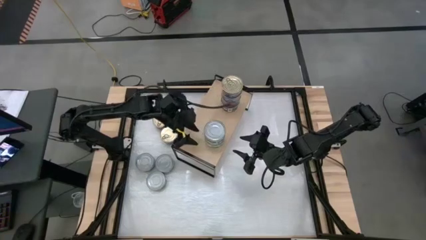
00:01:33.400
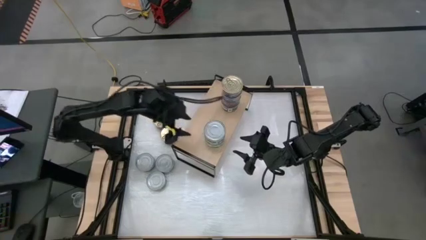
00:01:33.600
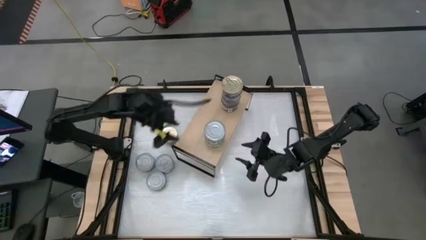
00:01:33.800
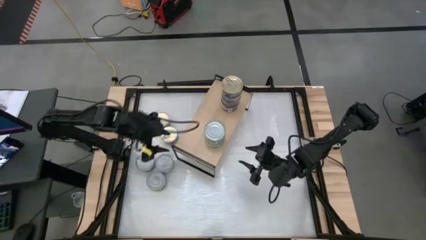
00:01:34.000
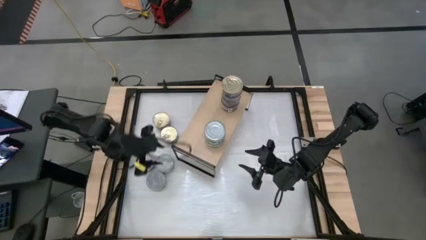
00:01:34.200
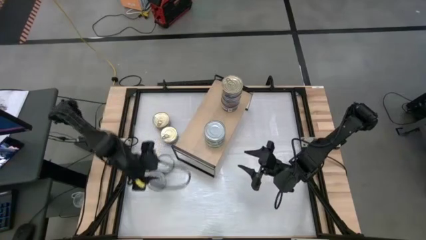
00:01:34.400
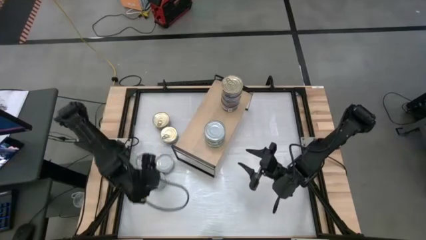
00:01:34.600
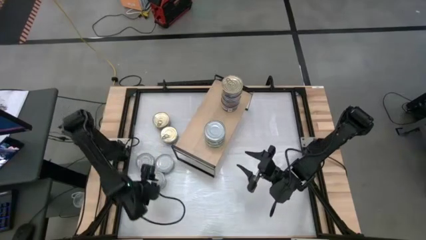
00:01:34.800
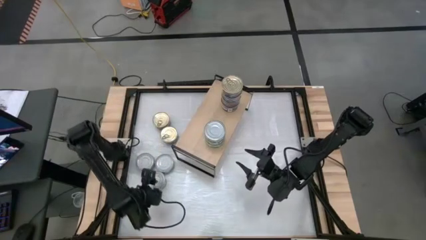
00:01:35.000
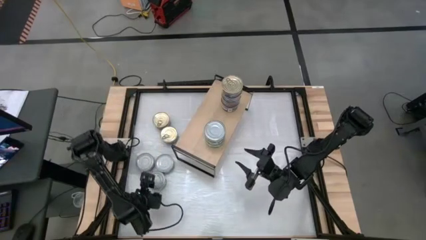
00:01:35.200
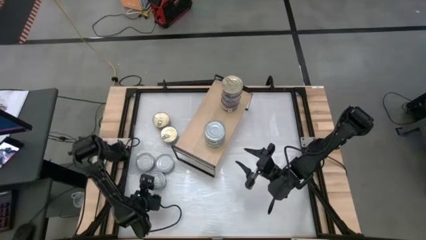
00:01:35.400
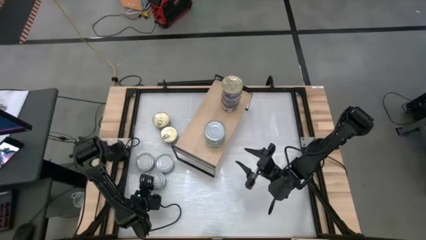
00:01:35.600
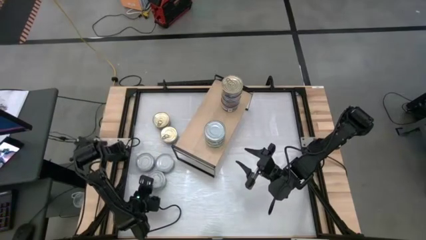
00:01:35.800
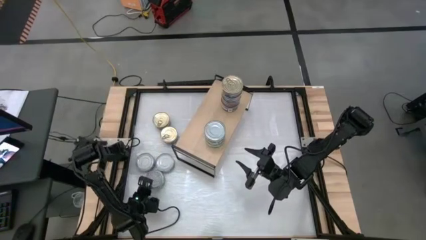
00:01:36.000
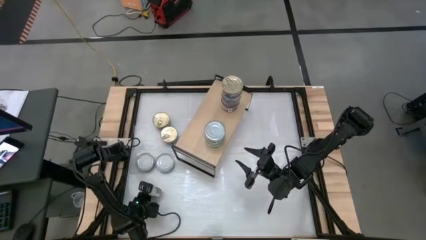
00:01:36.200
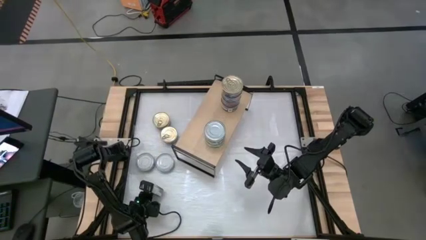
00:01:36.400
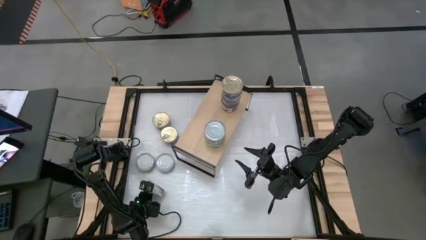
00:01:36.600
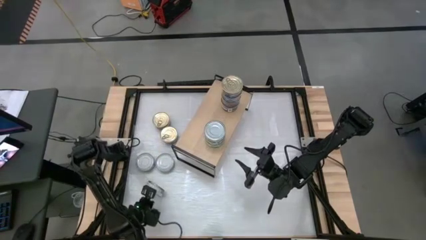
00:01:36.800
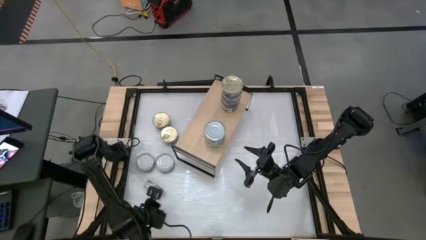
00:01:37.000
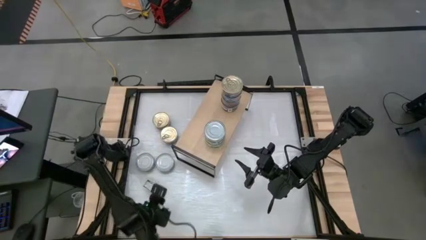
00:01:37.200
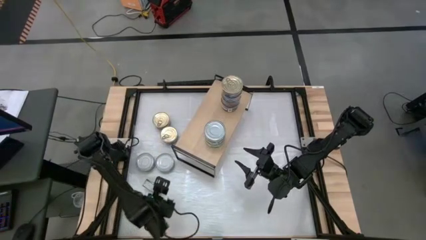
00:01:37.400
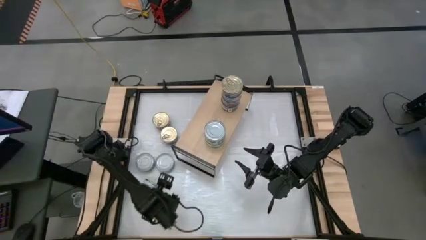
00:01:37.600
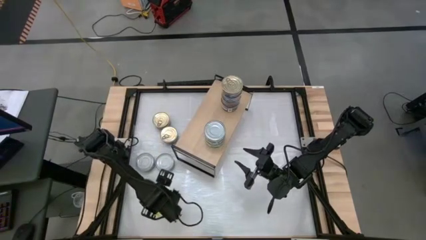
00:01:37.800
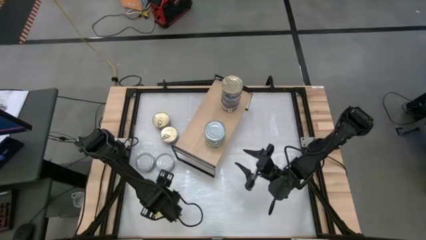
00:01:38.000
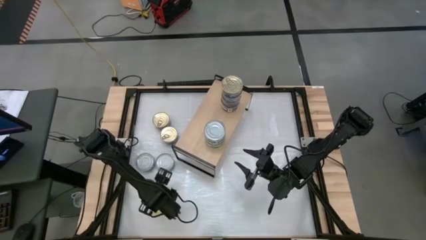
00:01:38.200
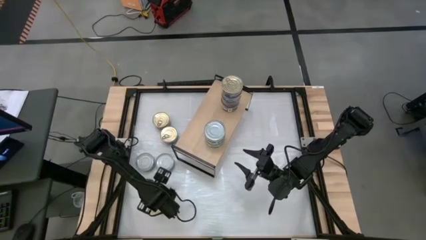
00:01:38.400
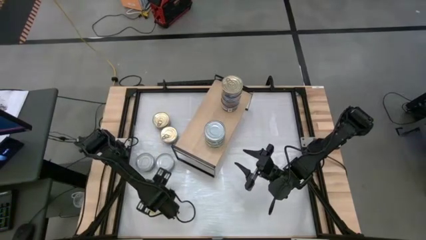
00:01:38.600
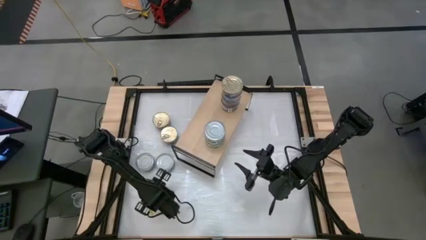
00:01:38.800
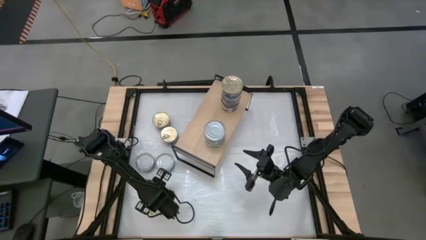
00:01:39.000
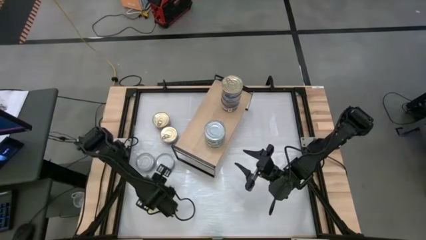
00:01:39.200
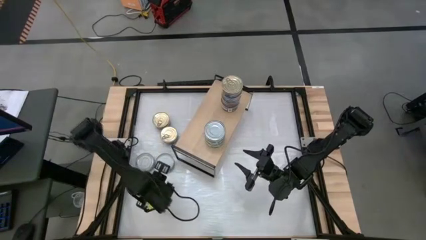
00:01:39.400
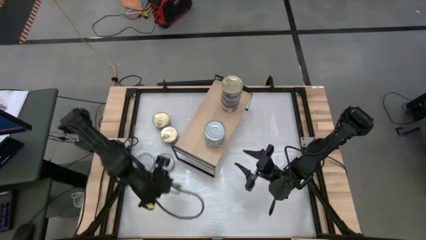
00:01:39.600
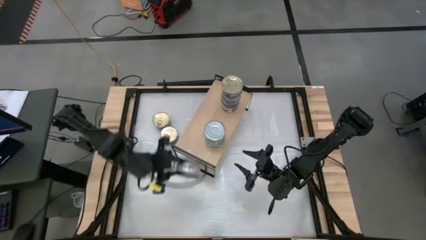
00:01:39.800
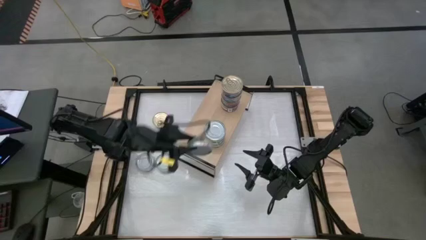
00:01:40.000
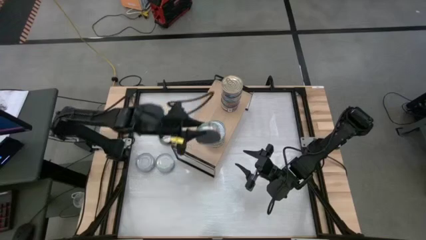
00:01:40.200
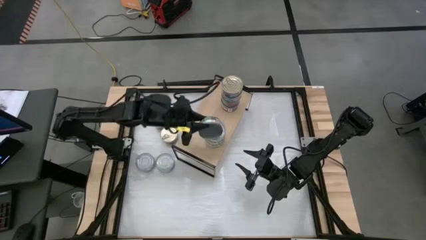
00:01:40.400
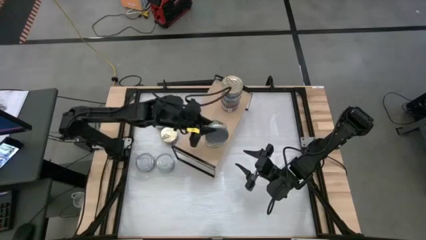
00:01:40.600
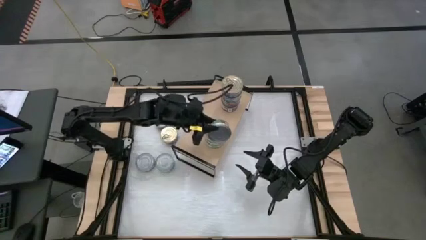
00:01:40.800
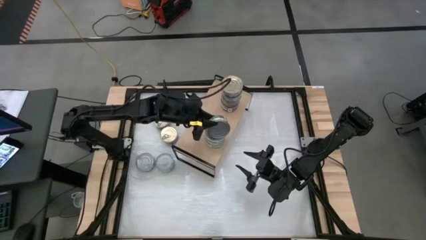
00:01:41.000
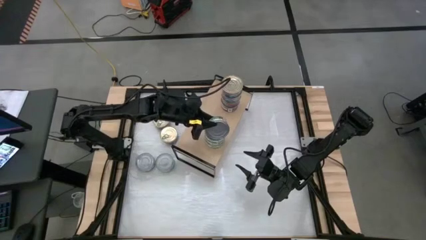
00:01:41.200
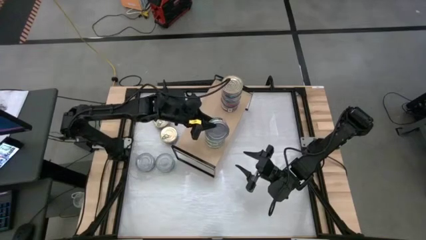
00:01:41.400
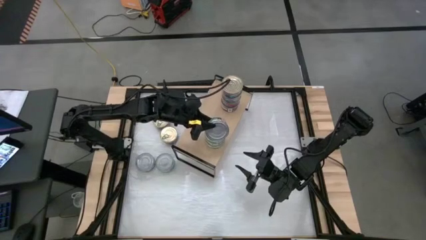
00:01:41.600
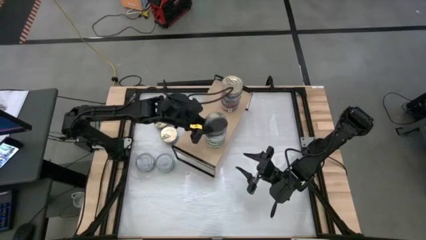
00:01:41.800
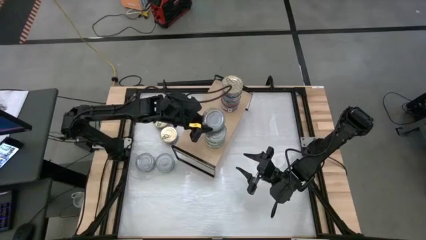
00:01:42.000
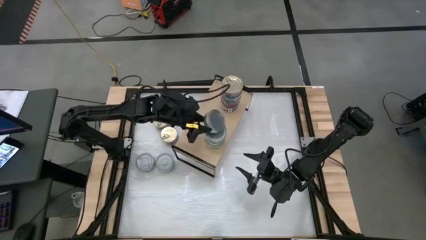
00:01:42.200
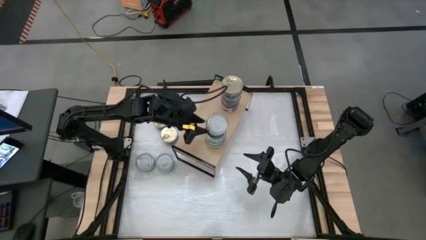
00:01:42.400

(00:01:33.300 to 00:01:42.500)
Task: Stack canned seafood by type on shelf
Stack the green tuna can on top of the other green tuna can

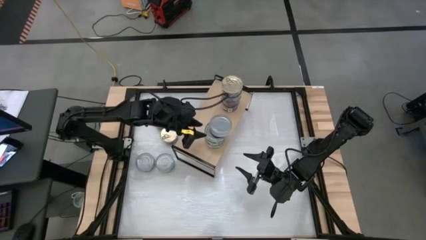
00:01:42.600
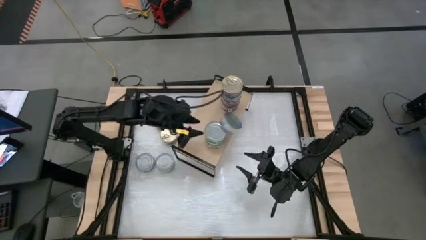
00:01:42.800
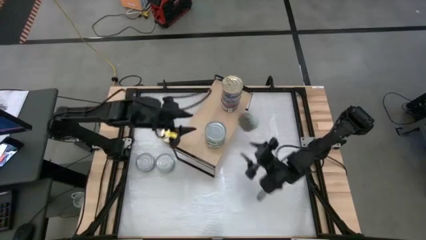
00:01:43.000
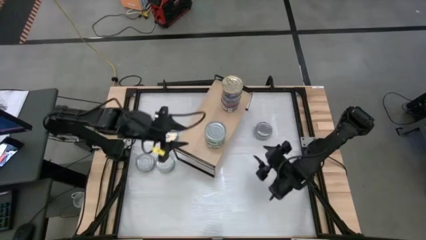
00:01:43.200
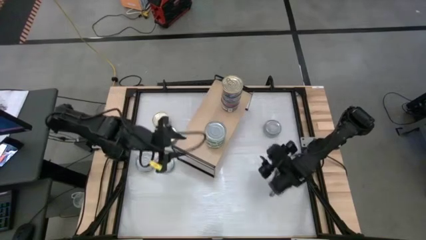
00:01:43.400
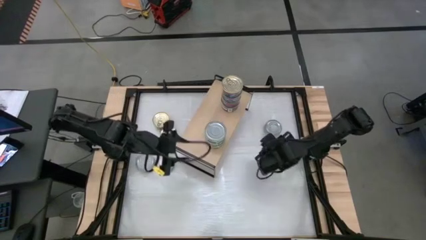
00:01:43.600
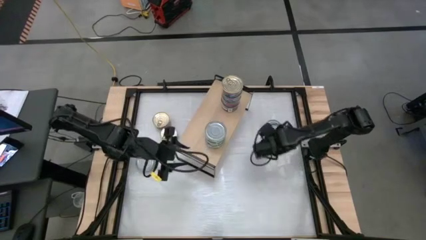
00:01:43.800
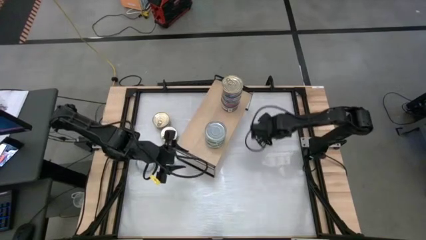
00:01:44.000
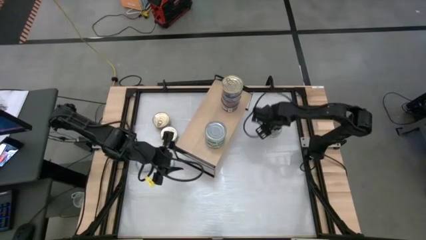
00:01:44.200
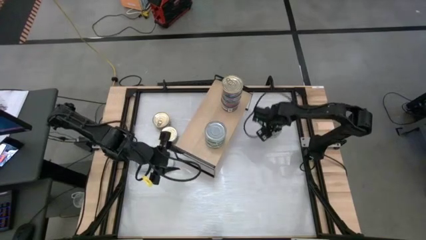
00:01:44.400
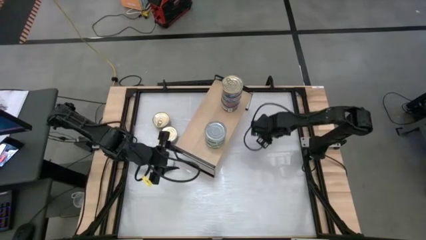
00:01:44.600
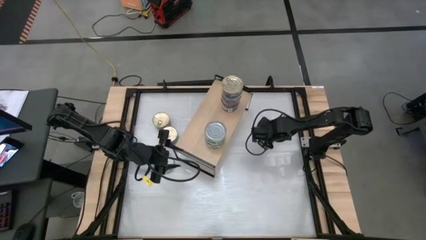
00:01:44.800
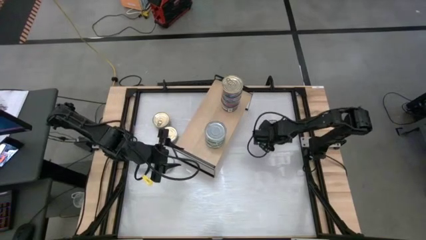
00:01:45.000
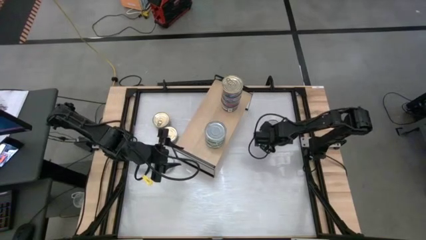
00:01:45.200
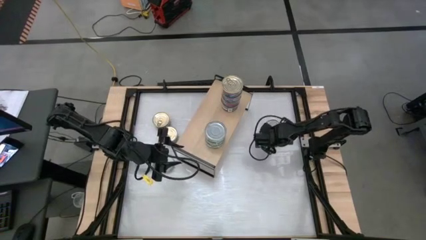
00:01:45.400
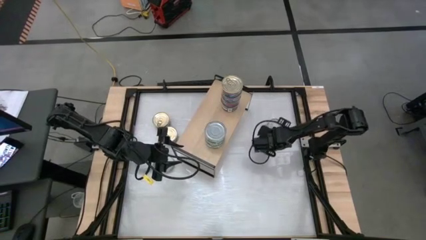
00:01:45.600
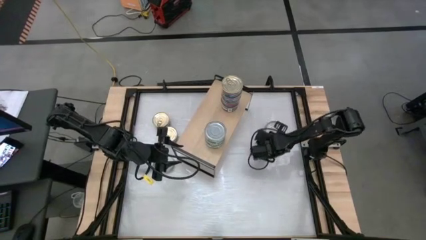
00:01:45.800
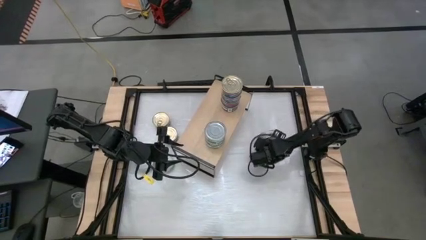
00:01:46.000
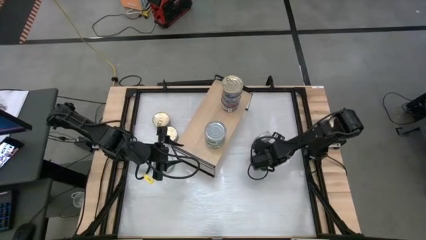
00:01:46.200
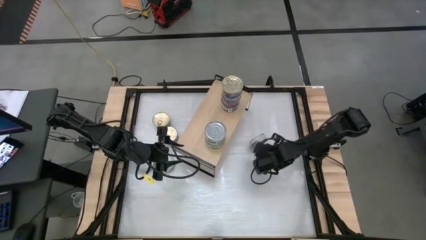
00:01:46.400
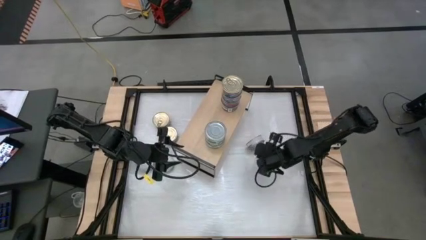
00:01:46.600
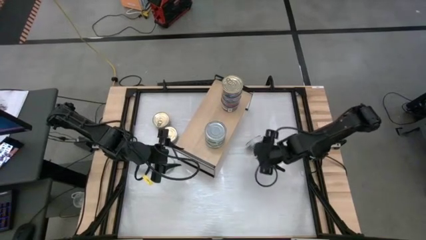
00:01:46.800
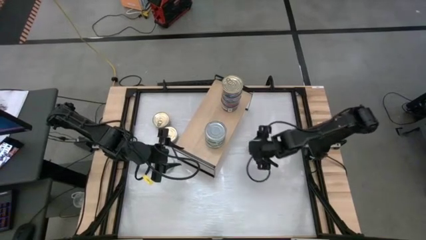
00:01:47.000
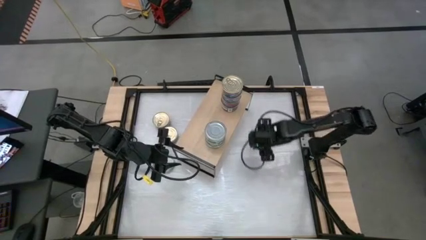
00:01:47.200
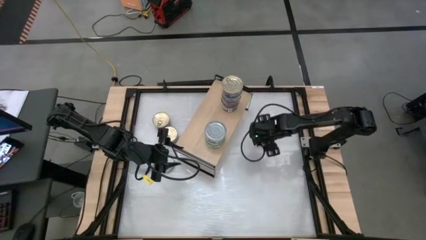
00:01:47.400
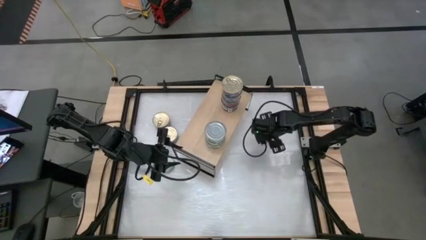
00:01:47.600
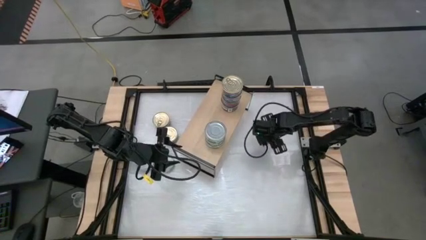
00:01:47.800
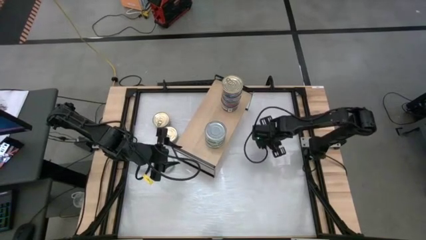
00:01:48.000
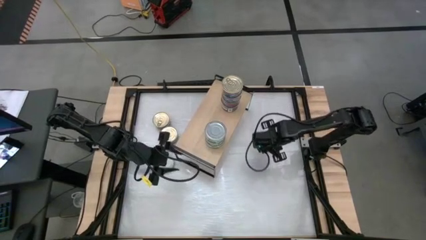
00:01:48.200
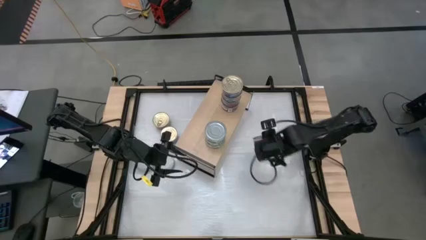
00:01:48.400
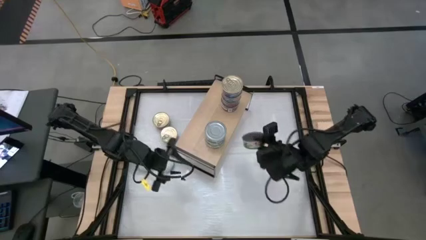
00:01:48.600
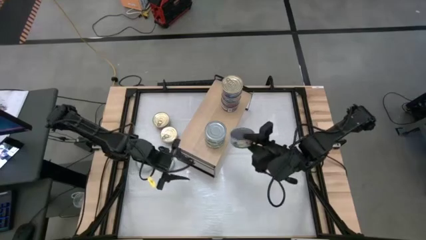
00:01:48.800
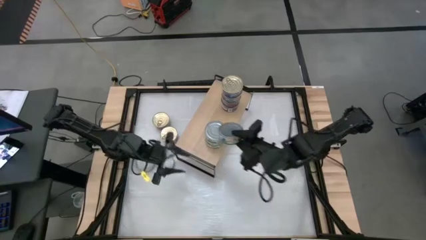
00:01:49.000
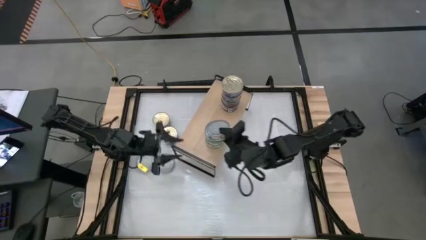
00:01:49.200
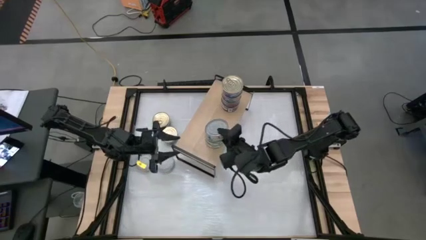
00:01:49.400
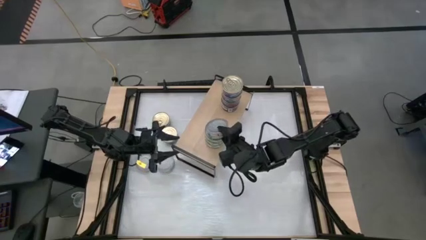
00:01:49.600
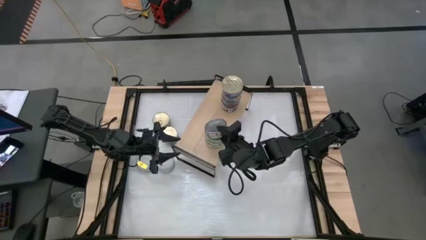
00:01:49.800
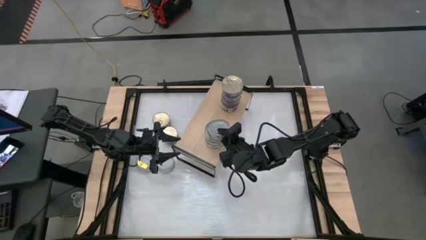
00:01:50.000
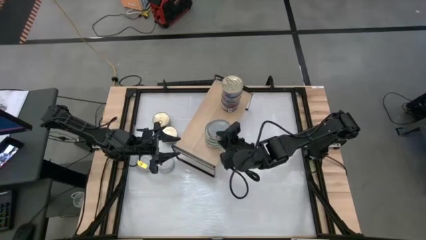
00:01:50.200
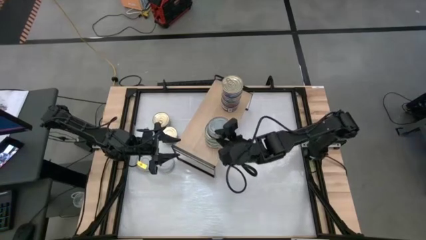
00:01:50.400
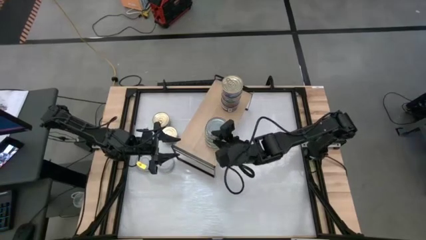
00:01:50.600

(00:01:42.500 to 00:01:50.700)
Stack the green tuna can on top of the other green tuna can
